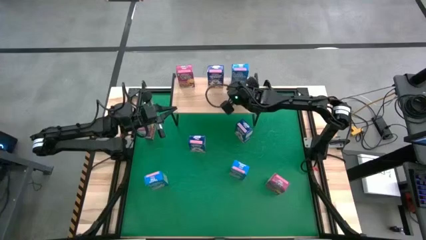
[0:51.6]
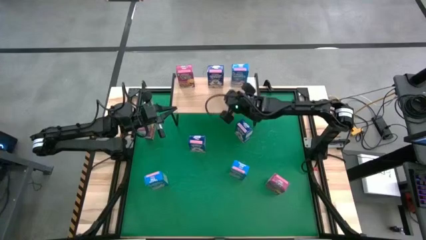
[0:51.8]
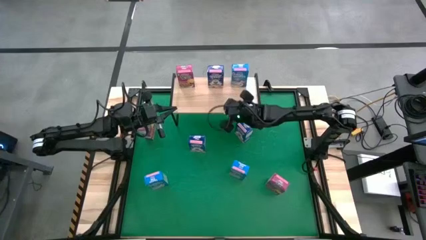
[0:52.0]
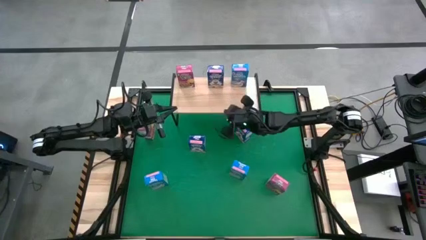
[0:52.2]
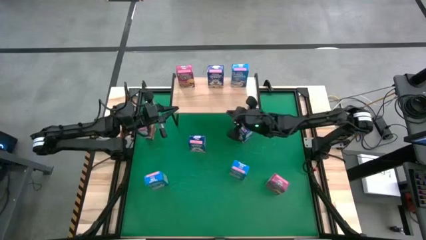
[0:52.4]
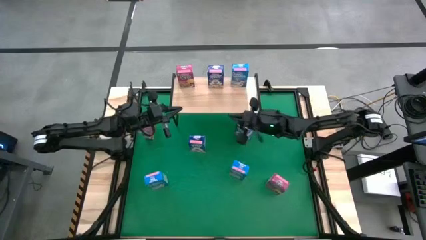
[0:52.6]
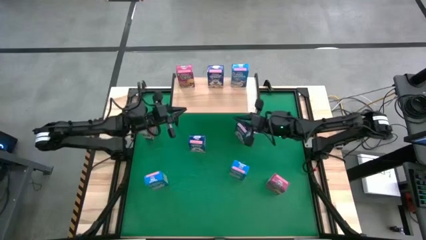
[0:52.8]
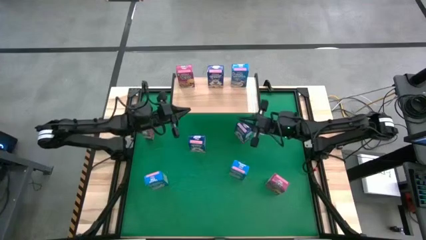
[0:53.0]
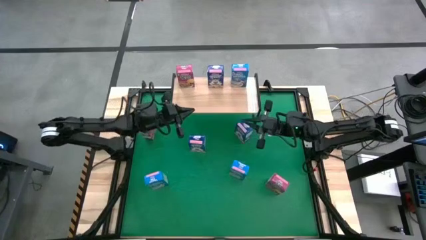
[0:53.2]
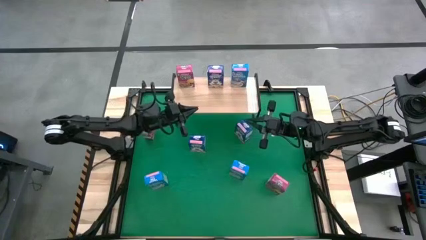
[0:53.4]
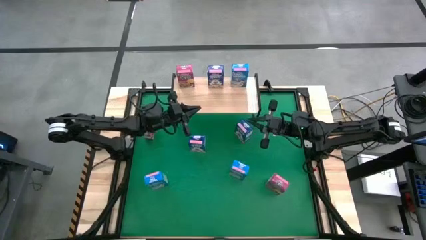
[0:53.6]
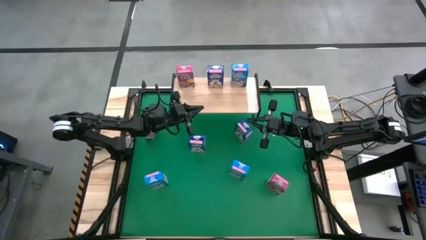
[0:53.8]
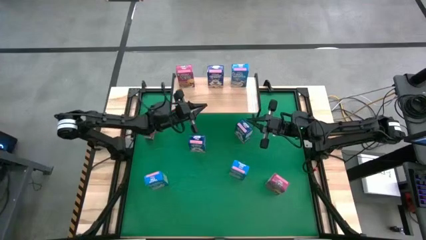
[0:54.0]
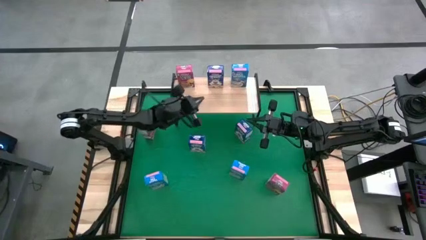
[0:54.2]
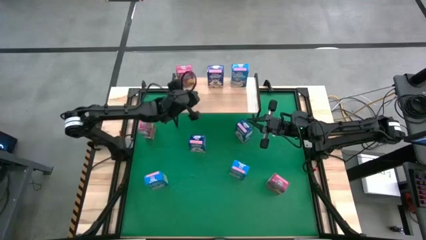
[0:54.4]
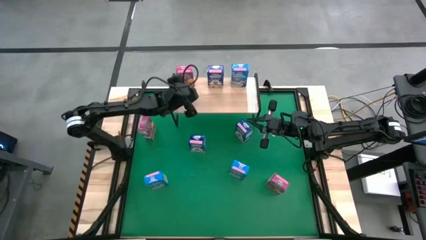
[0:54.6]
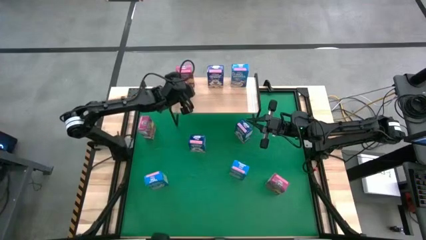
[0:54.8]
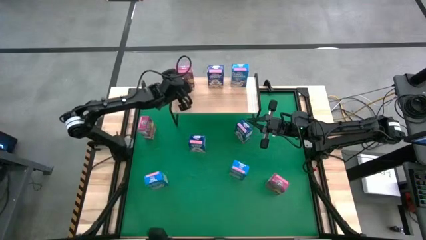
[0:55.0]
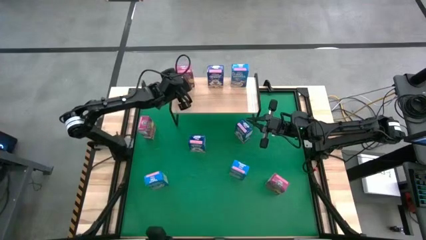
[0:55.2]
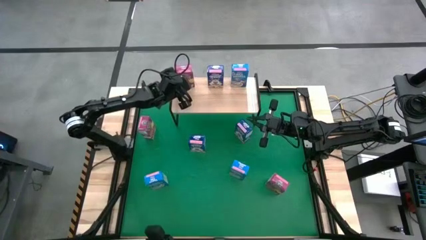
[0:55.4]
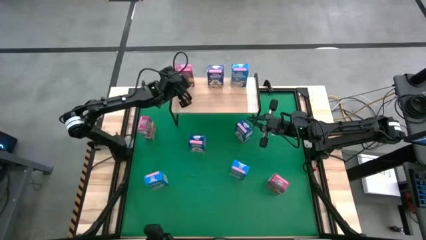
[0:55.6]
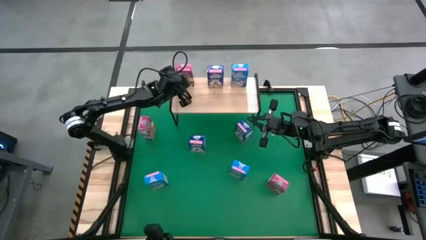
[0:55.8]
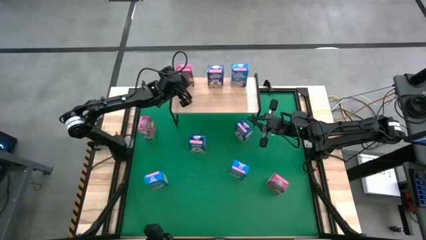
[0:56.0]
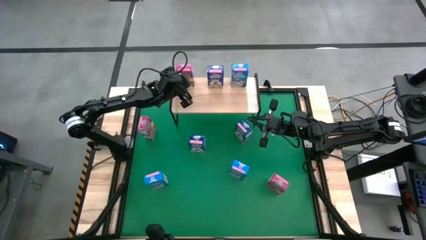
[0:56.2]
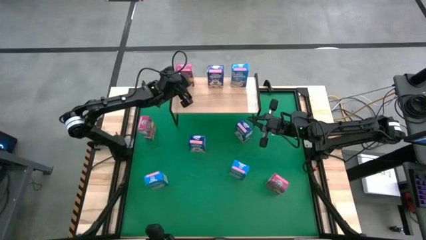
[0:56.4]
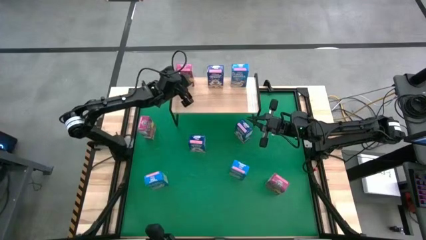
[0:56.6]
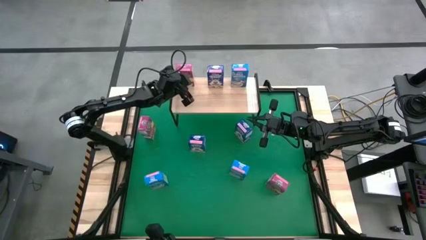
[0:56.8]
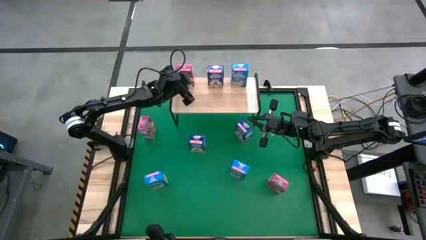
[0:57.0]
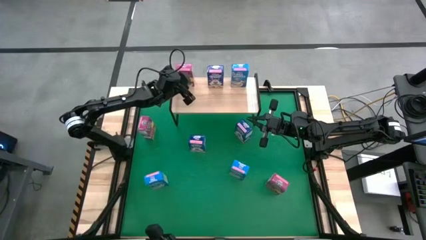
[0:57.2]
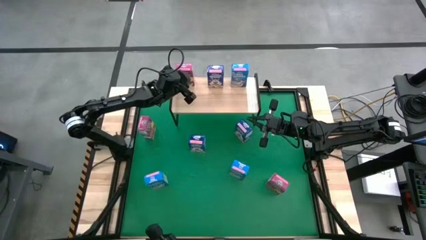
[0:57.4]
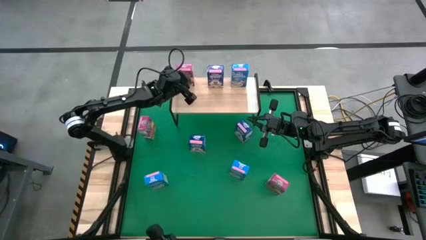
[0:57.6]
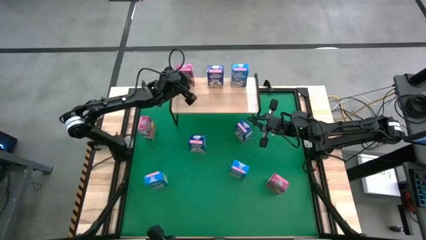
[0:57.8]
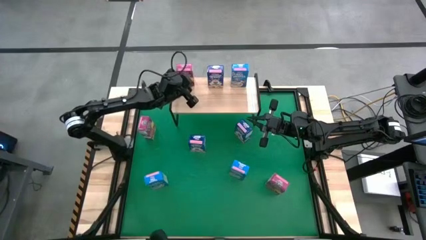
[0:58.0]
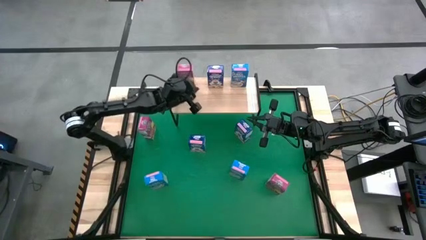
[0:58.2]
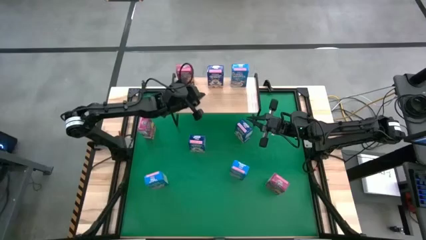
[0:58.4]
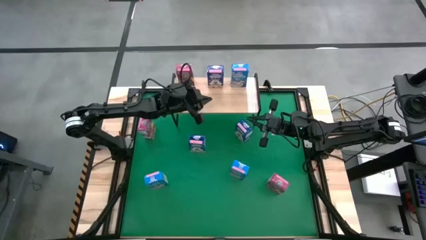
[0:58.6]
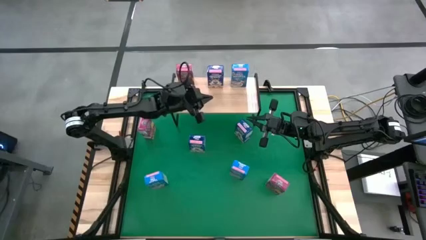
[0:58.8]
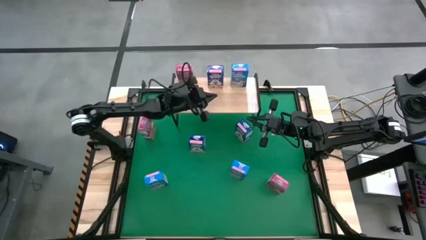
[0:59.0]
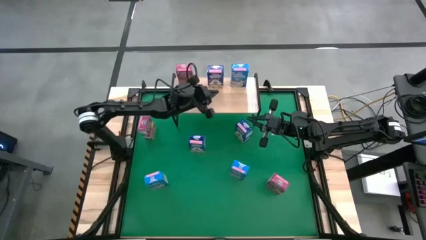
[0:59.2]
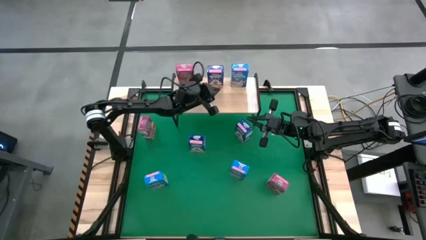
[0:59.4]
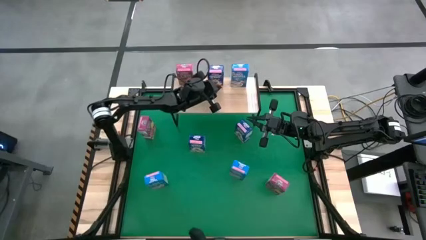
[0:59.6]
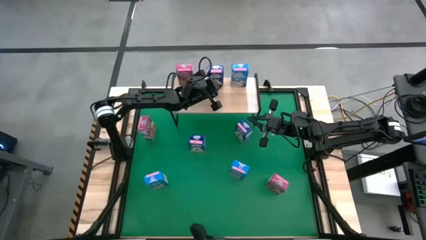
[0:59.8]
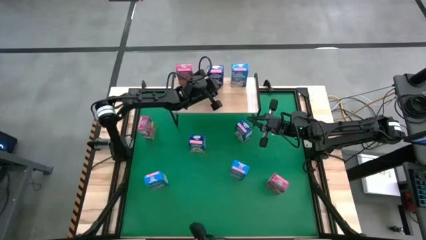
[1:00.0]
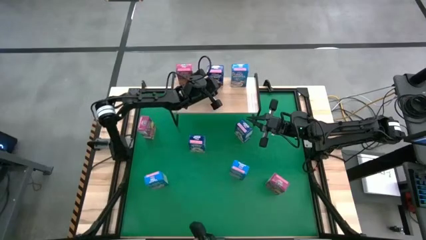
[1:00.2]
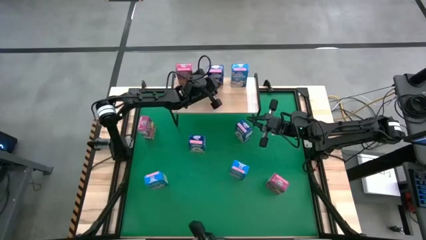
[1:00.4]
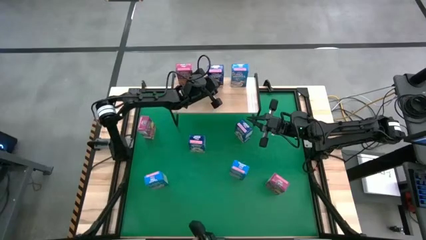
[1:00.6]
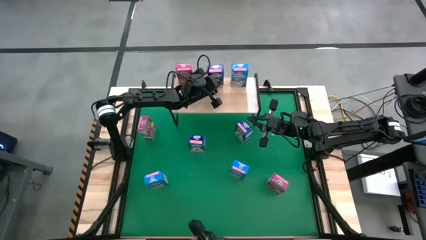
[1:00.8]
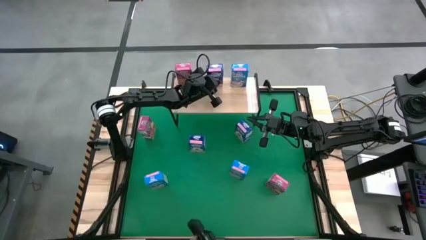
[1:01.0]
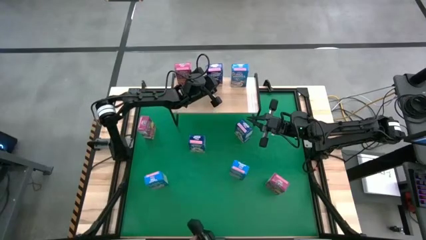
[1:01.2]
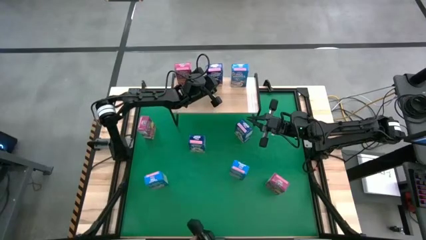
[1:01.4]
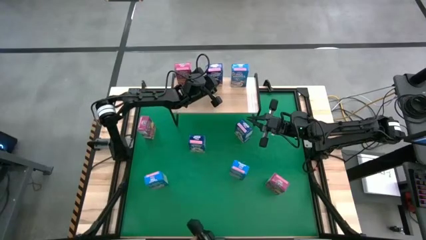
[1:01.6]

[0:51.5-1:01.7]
Task: Stack cereal on shelf
Adjust the cereal boxes on the shelf

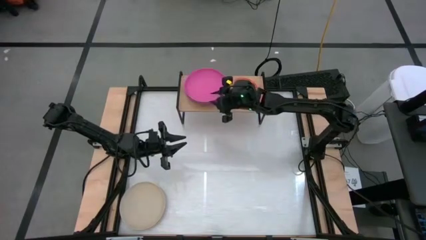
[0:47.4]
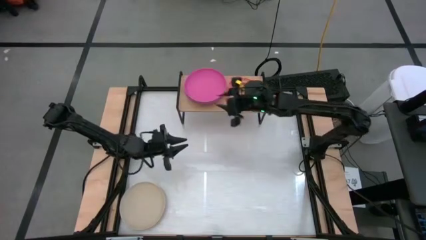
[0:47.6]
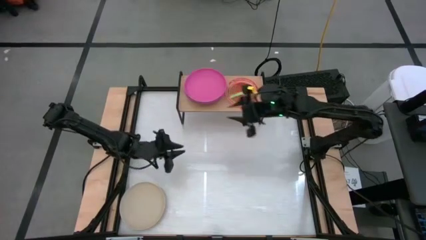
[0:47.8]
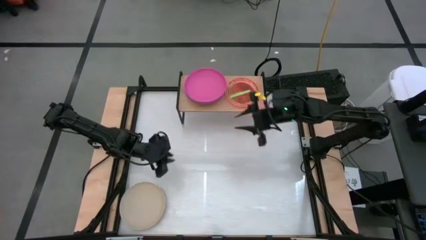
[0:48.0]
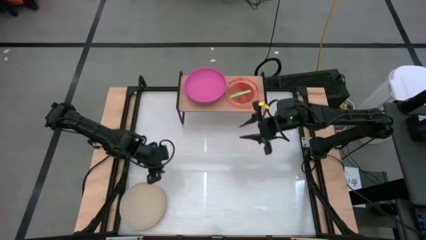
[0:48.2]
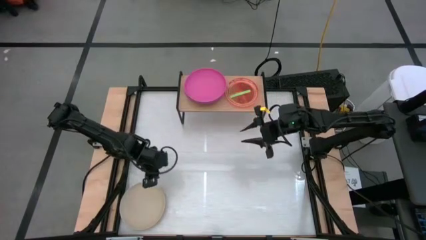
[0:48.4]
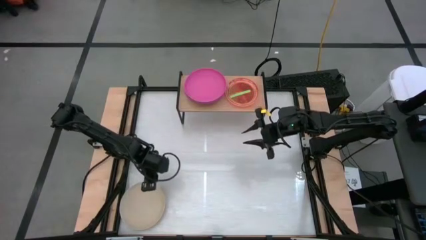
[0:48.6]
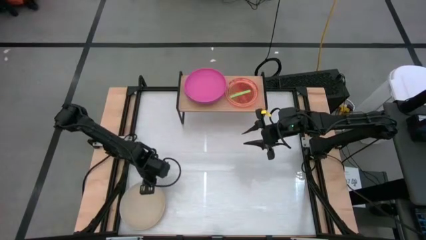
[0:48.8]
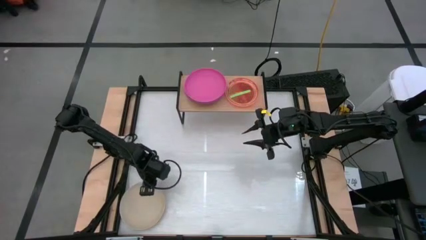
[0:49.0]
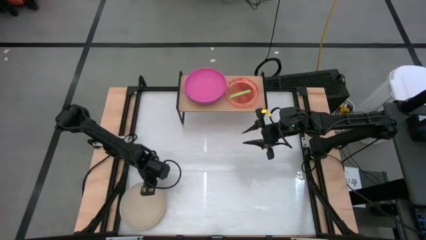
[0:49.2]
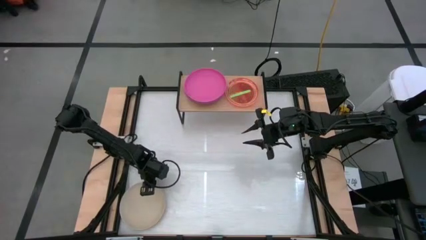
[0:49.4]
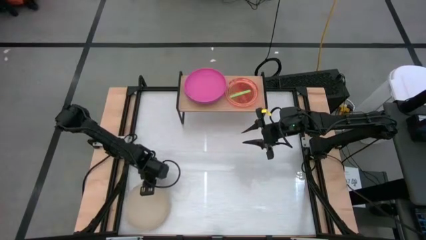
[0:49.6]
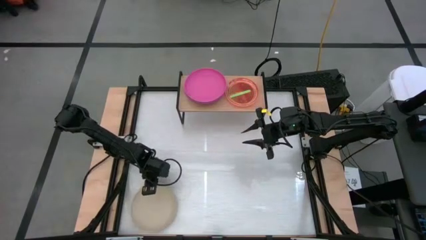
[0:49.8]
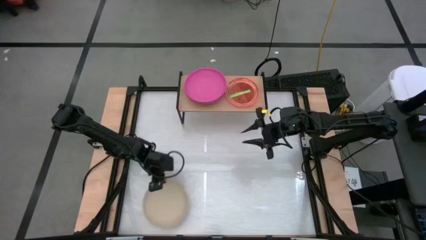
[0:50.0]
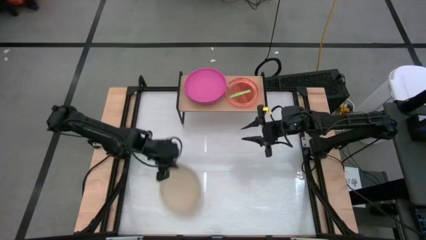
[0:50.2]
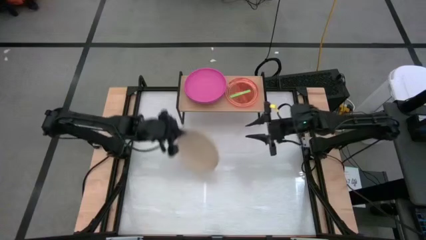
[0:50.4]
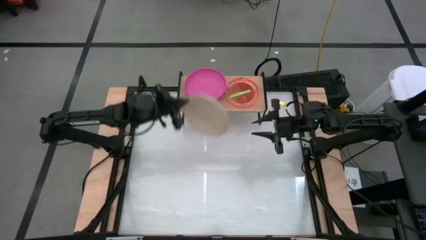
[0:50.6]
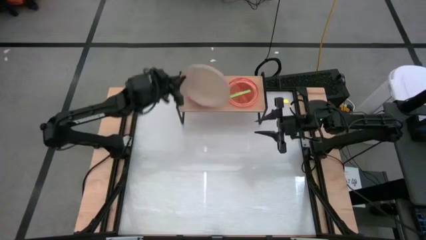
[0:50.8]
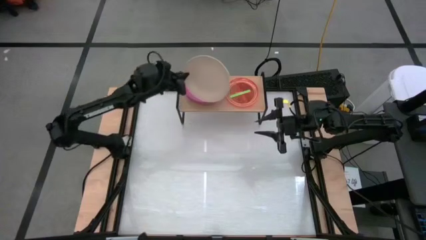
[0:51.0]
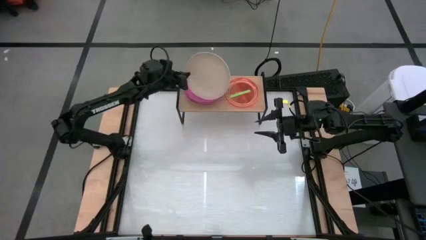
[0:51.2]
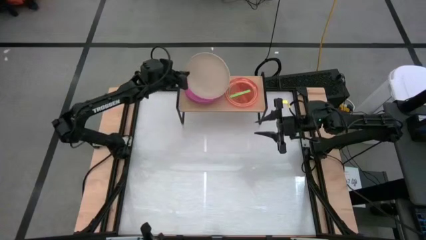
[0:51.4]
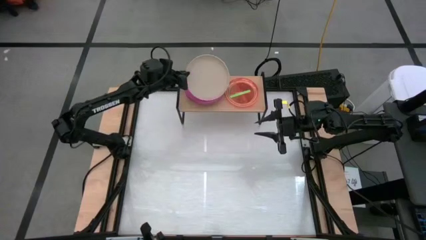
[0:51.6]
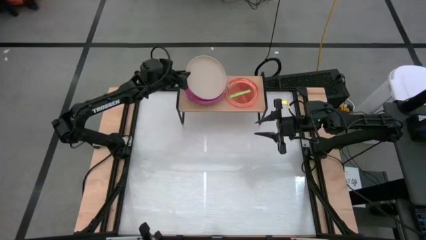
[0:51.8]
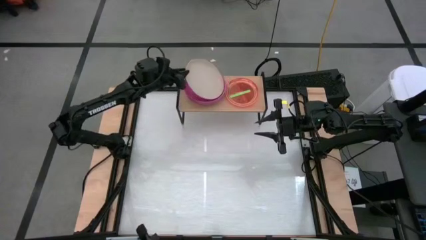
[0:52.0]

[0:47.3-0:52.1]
Task: Place and stack plates onto a shelf
Stack the white plate on top of the pink plate on the shelf
